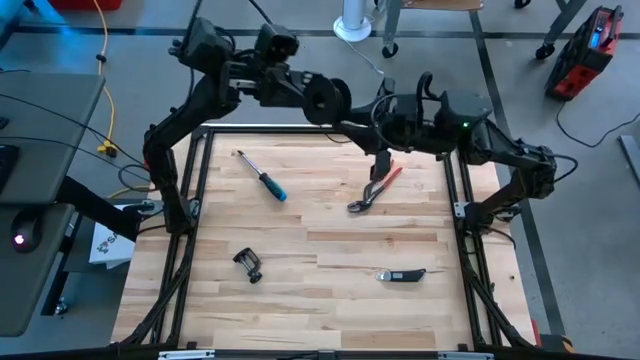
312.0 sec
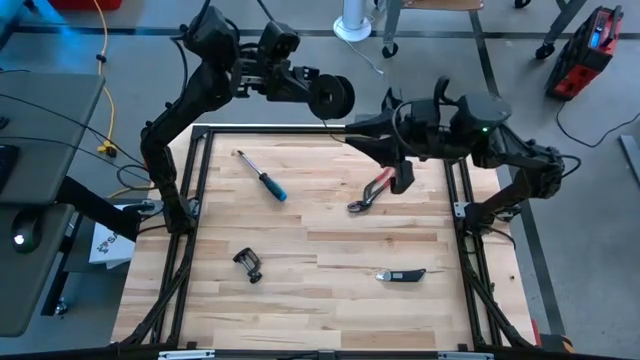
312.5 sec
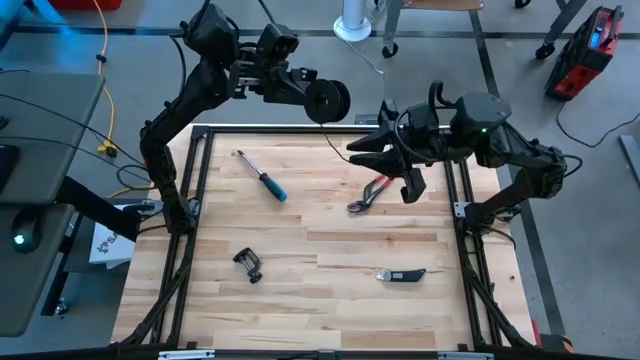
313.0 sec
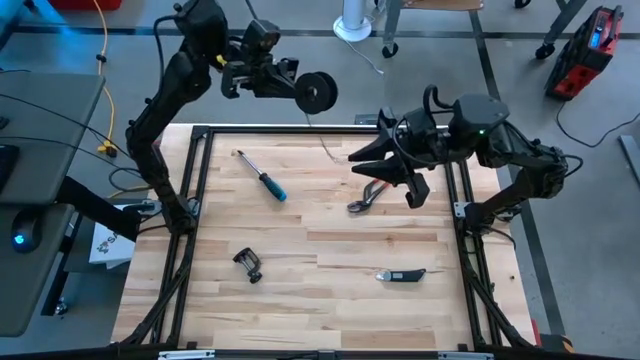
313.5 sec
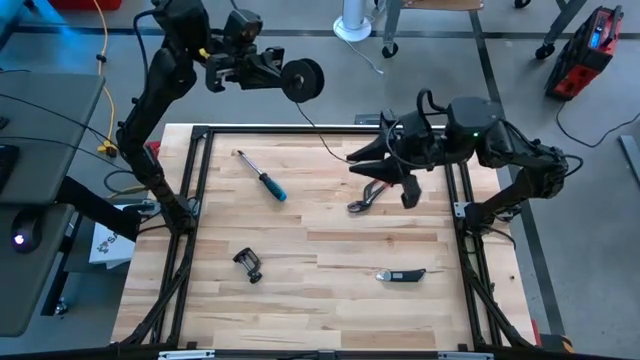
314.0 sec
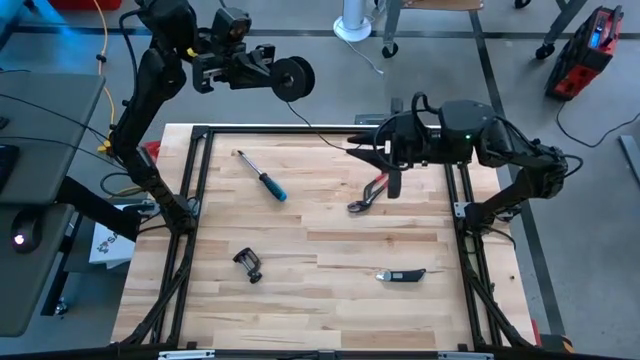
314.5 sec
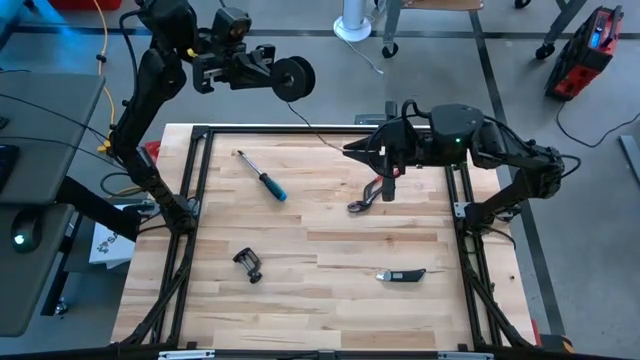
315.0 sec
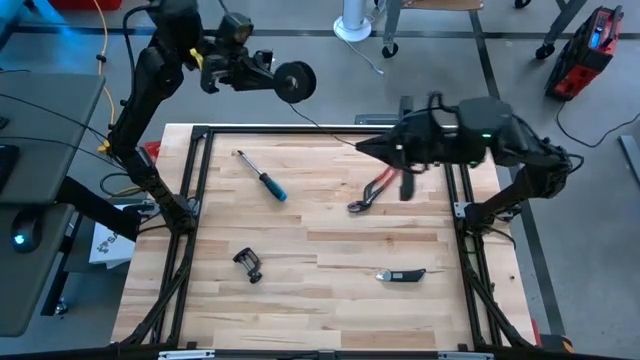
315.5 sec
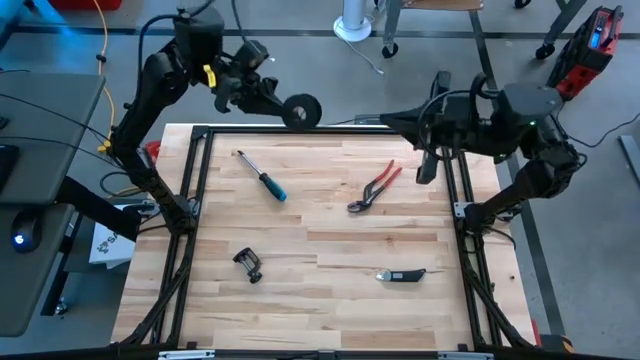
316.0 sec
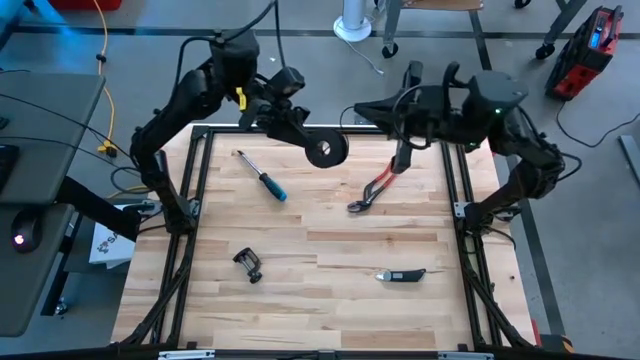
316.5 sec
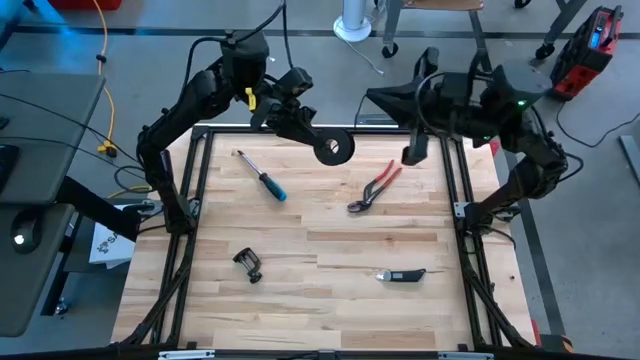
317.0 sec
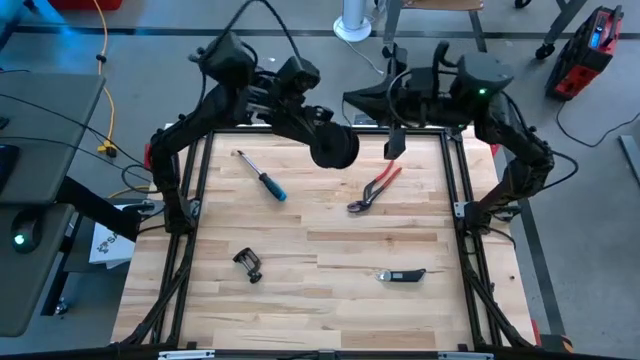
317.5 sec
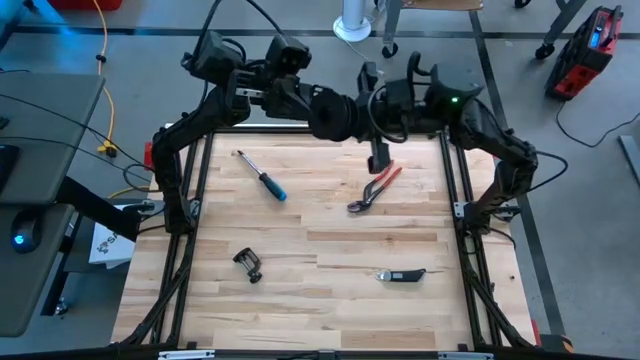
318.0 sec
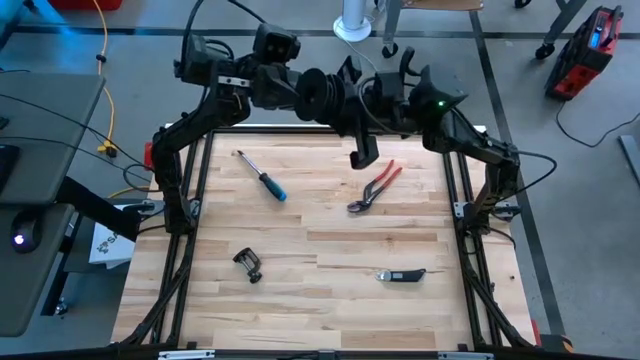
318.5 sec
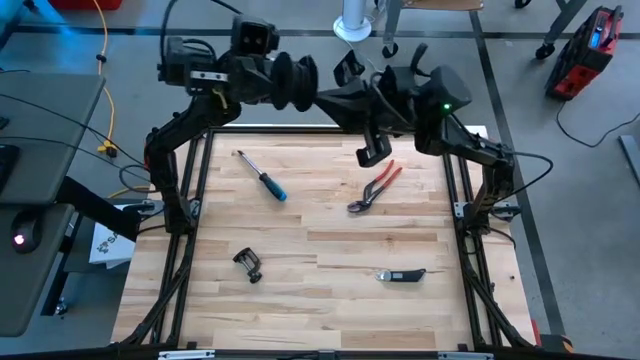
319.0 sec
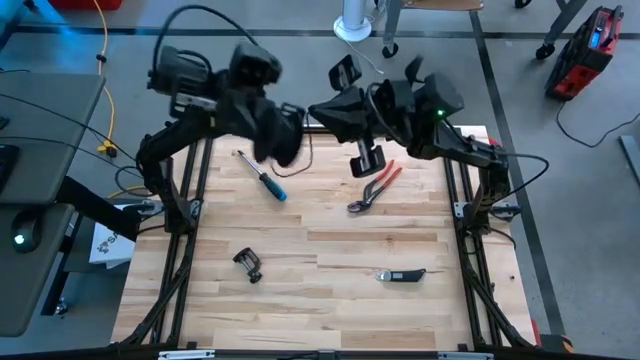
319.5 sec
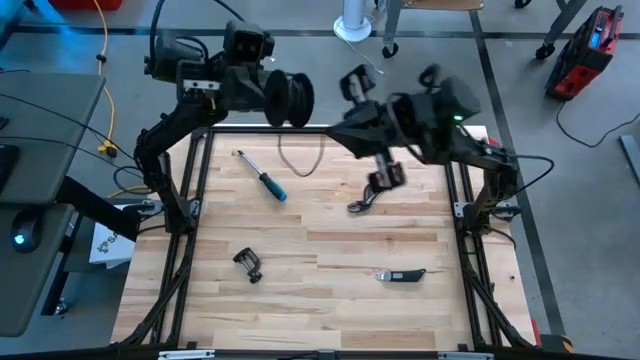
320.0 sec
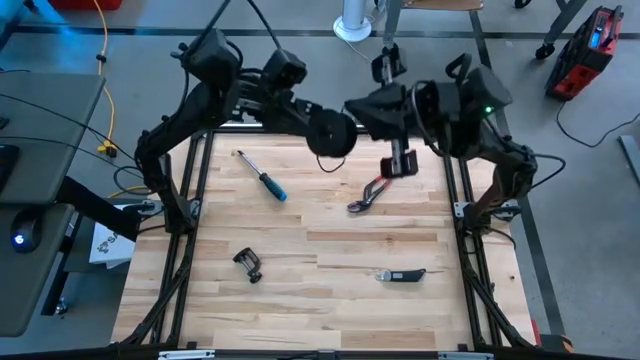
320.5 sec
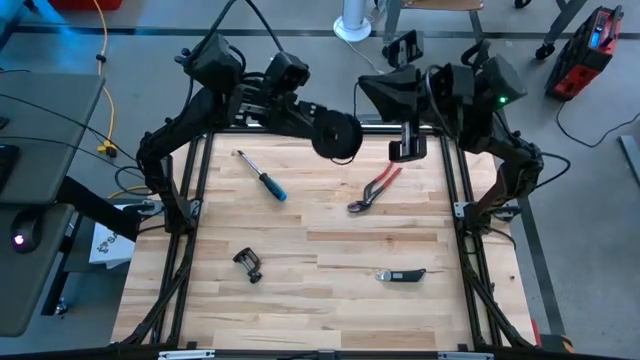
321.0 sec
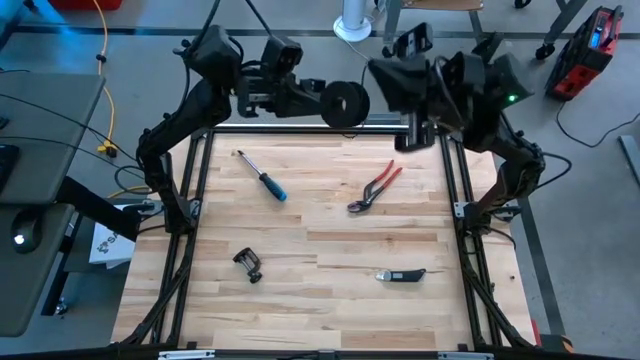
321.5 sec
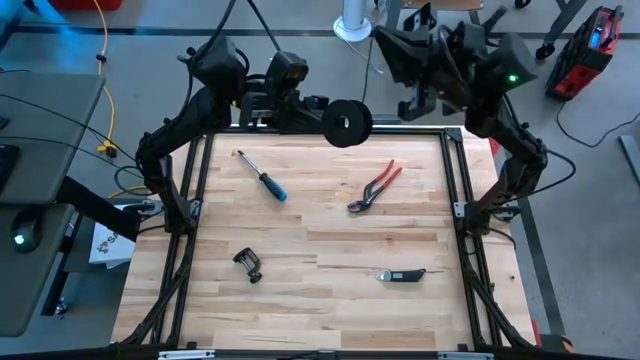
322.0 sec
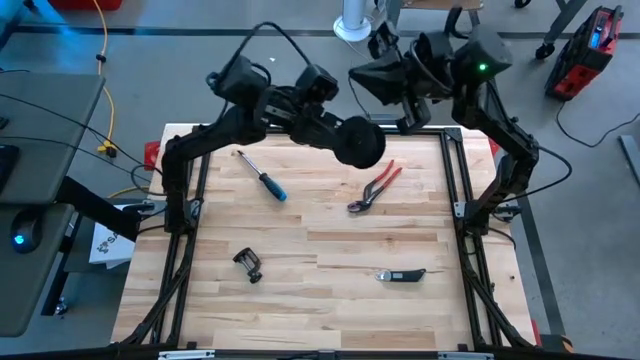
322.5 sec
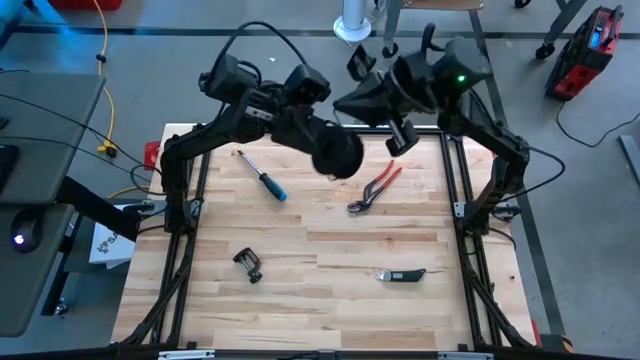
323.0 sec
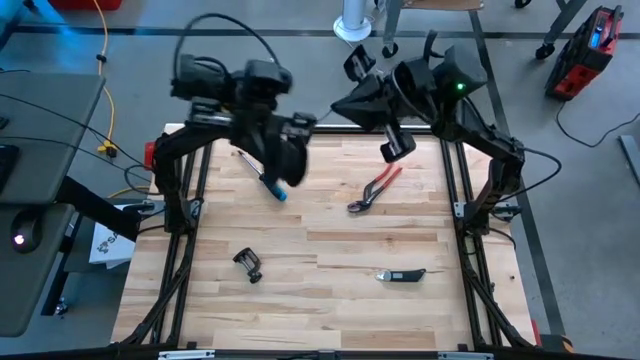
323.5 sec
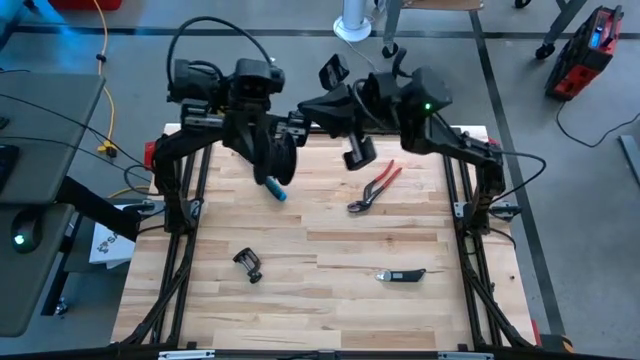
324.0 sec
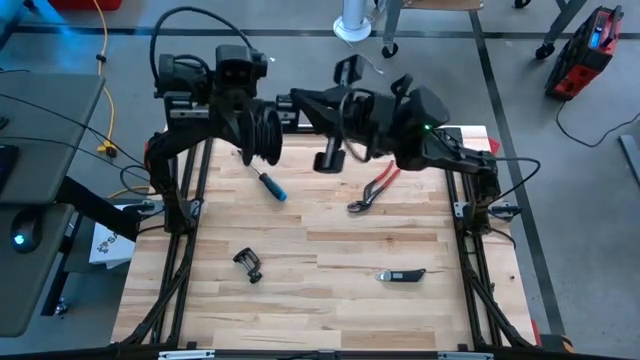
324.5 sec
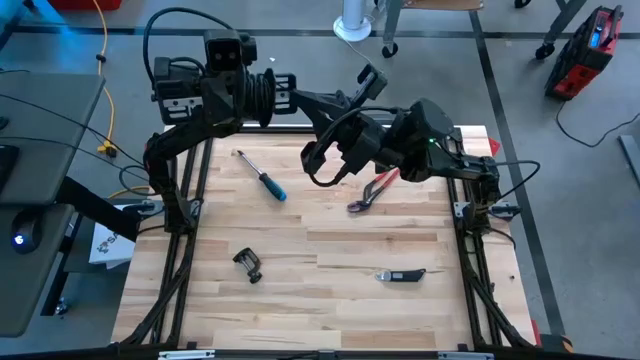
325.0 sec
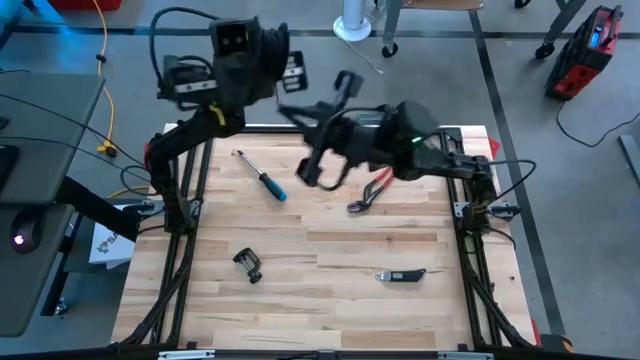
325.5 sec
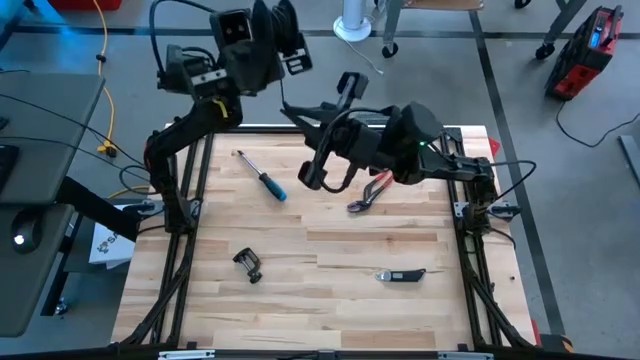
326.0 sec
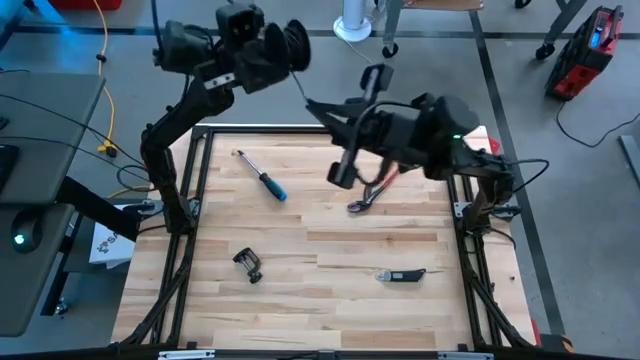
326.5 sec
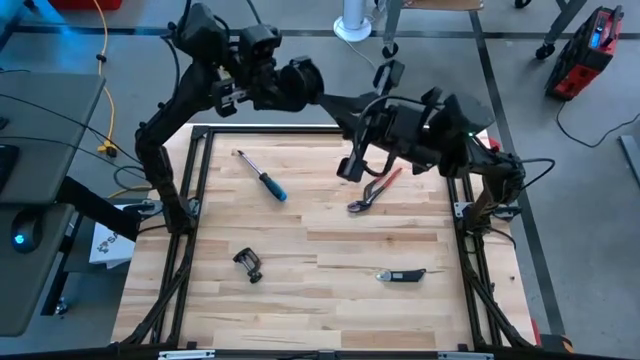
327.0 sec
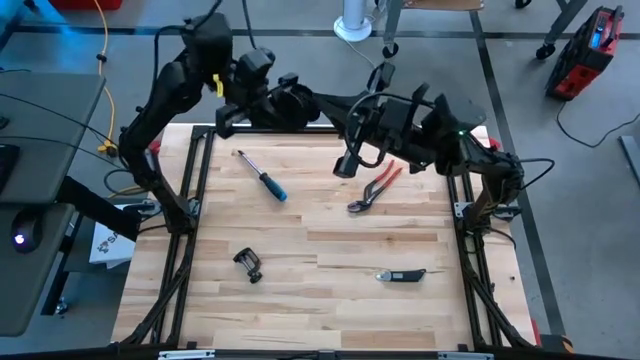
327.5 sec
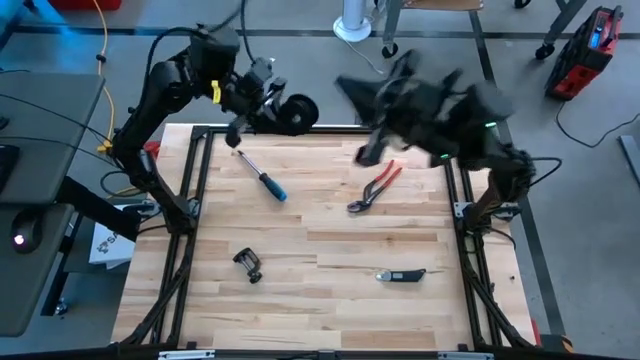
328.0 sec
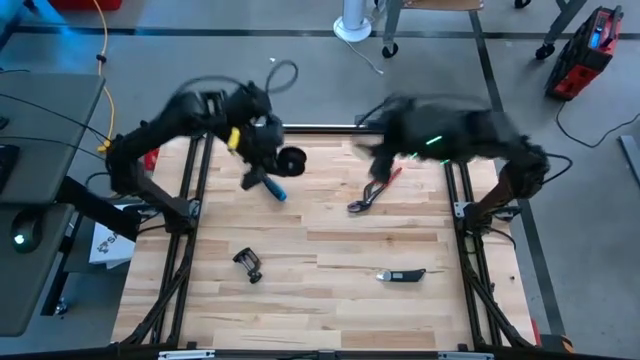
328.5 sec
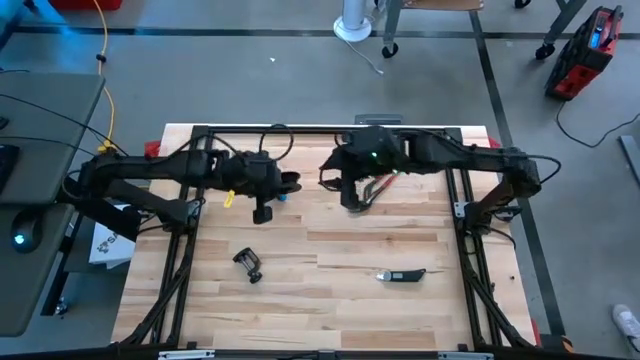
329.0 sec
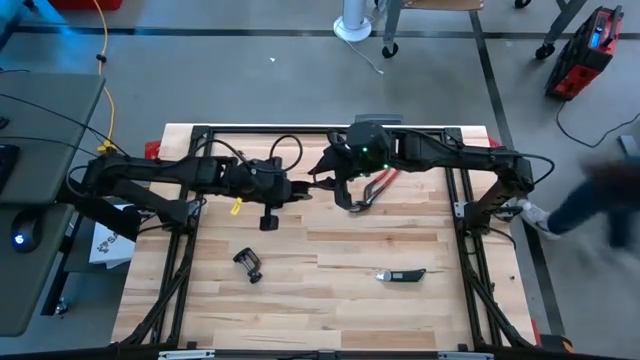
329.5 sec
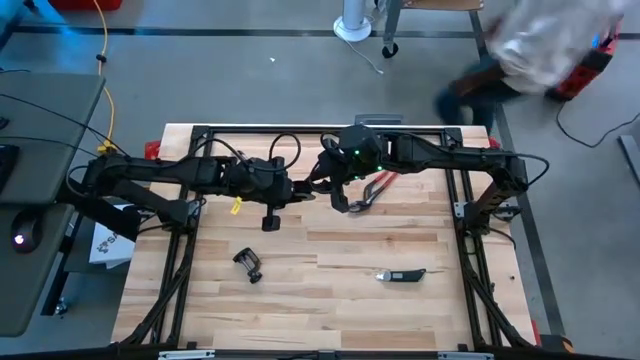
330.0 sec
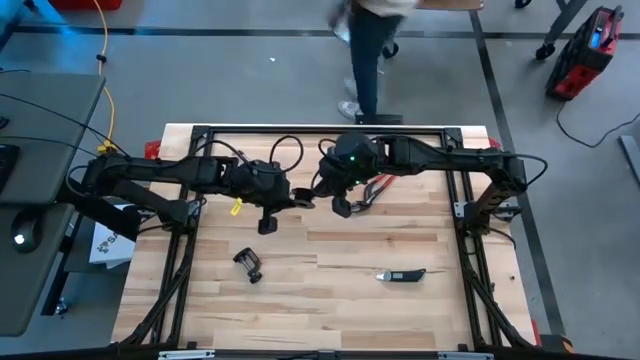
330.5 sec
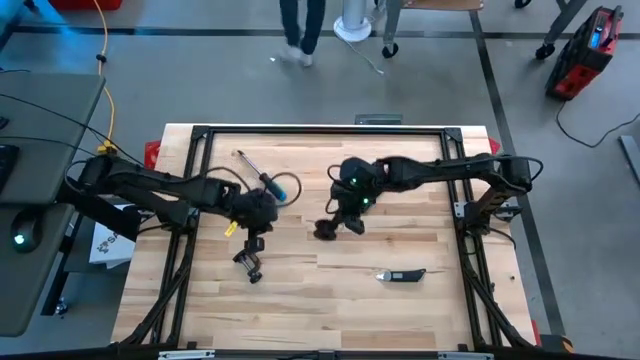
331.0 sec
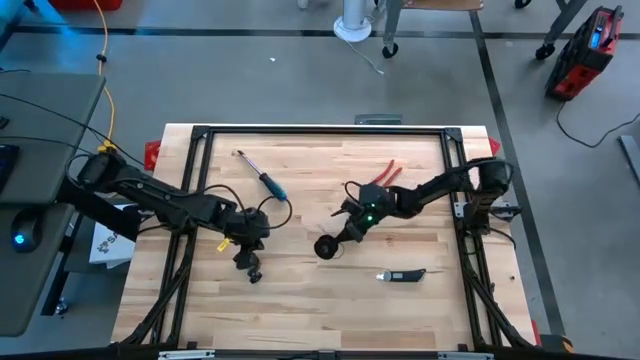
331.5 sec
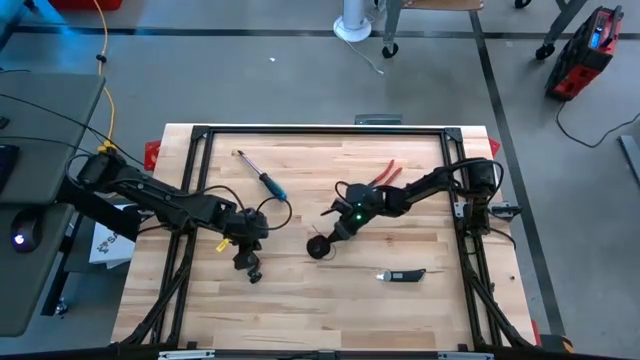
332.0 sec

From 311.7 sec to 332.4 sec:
Task: Coil cords
Coil the black wire onto the black spool
